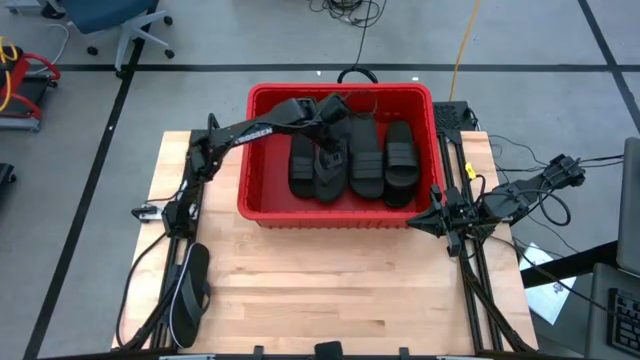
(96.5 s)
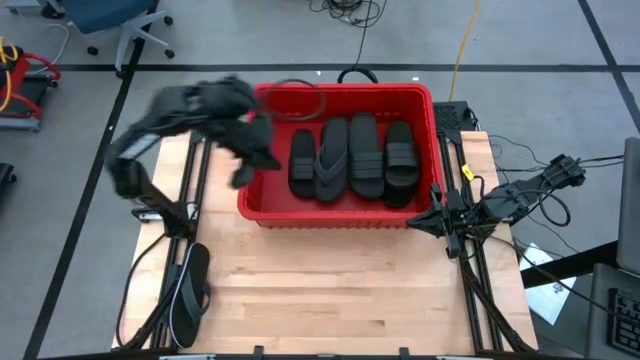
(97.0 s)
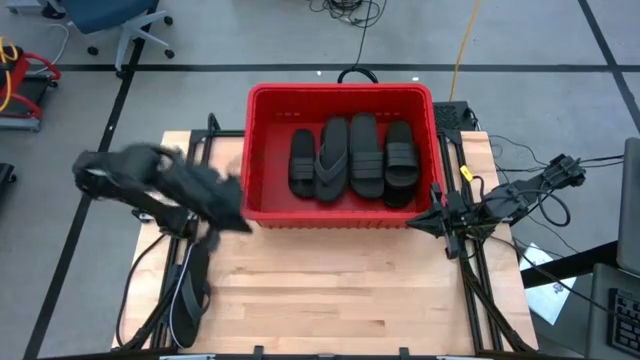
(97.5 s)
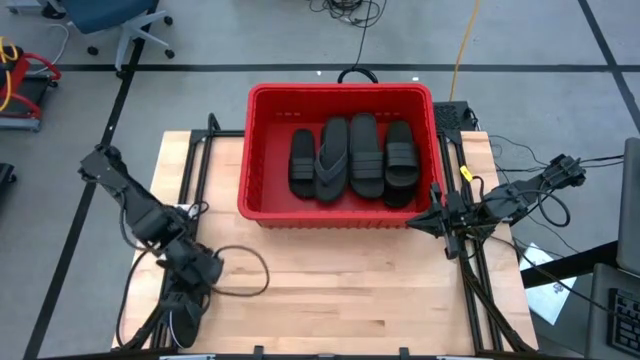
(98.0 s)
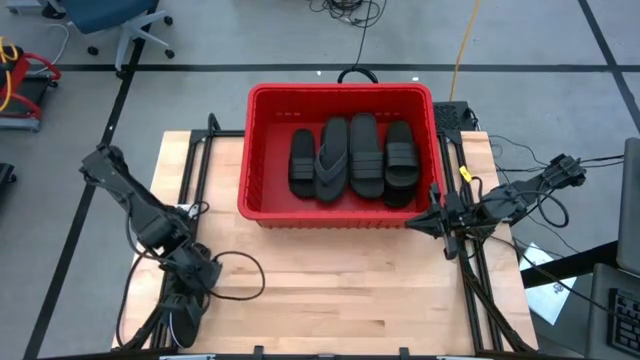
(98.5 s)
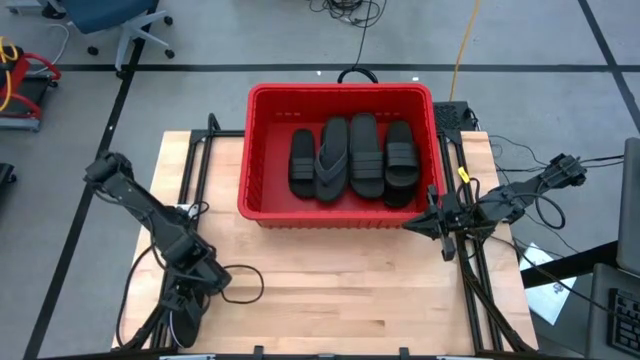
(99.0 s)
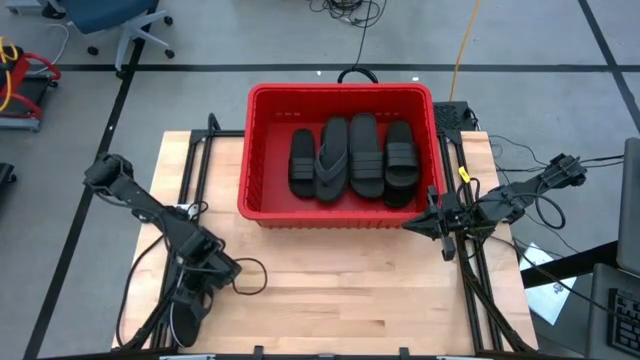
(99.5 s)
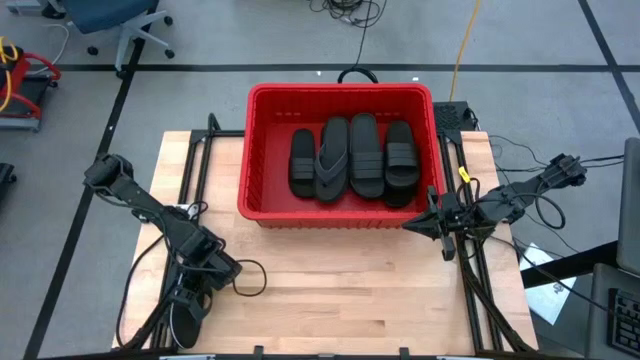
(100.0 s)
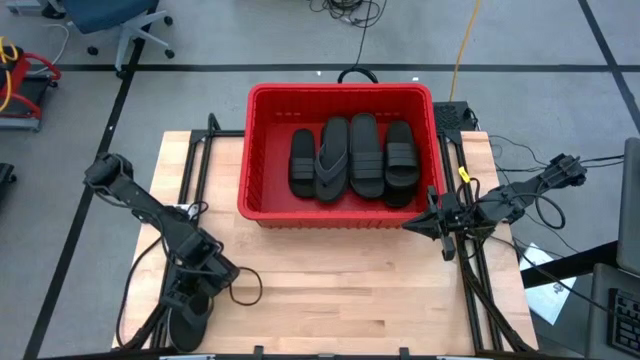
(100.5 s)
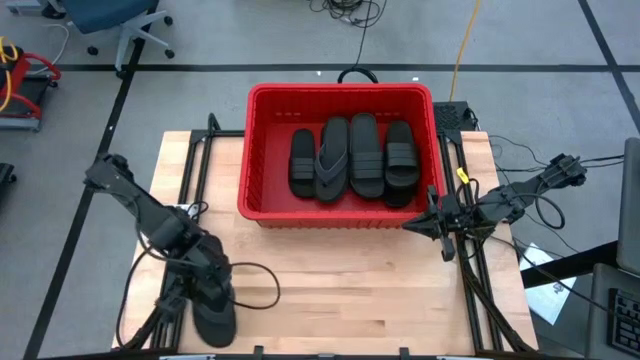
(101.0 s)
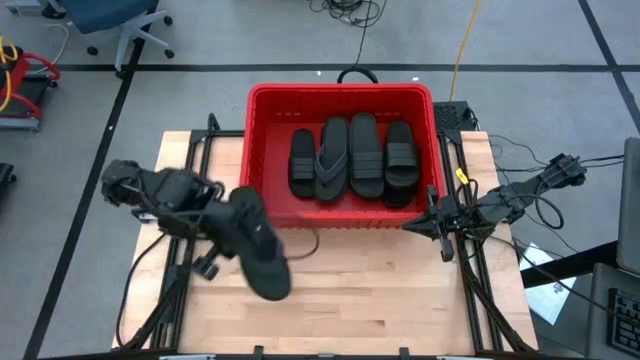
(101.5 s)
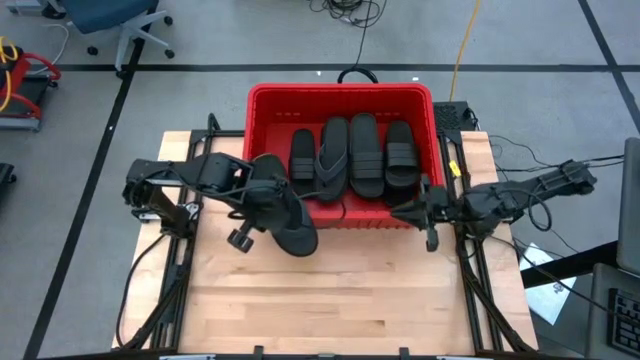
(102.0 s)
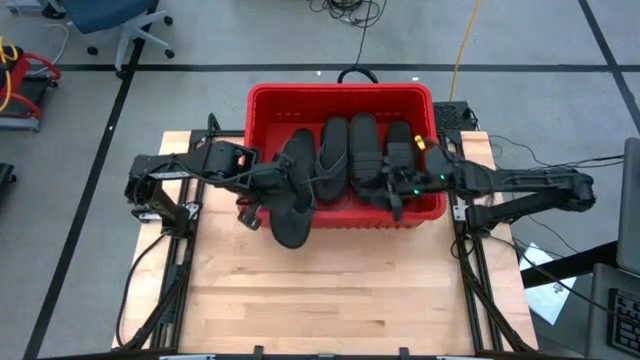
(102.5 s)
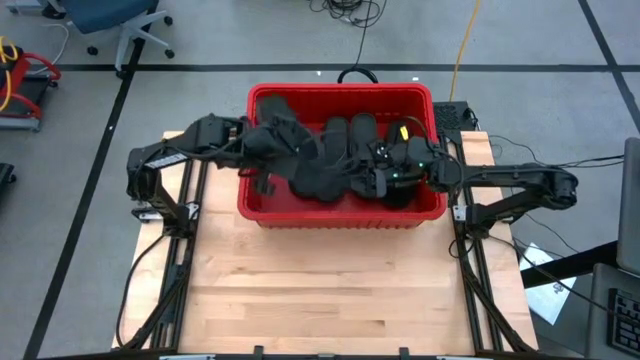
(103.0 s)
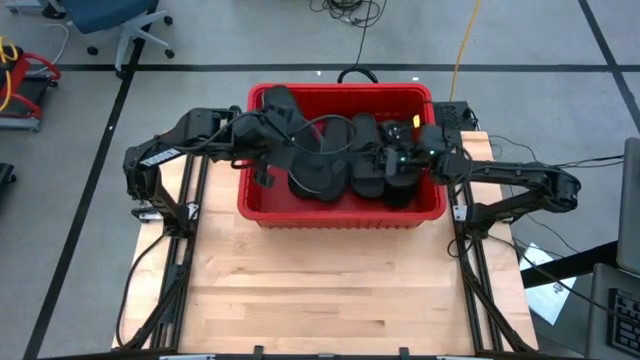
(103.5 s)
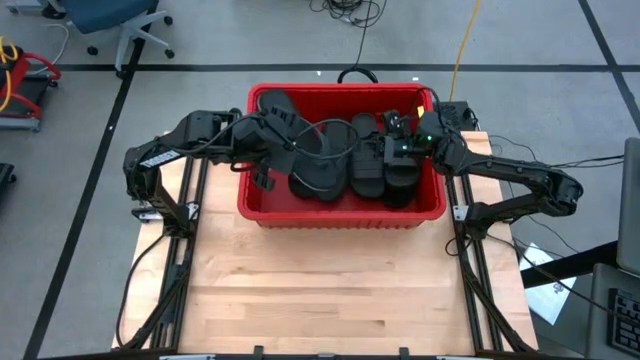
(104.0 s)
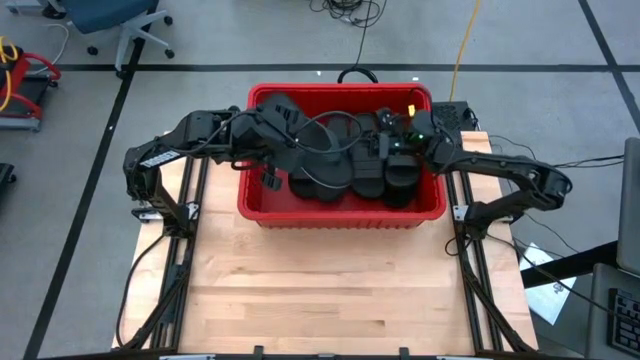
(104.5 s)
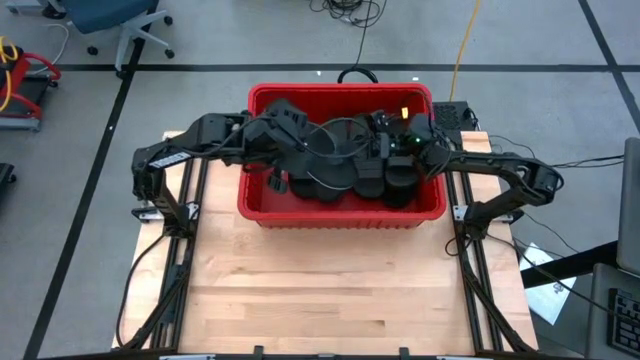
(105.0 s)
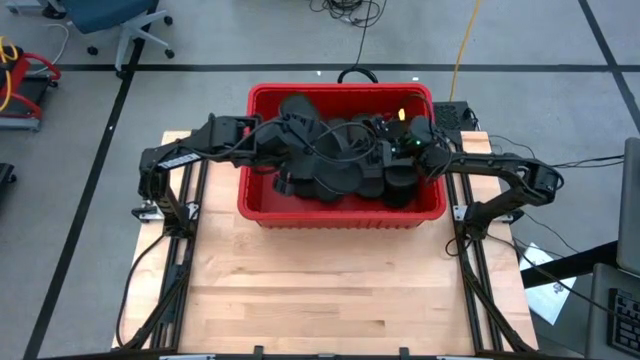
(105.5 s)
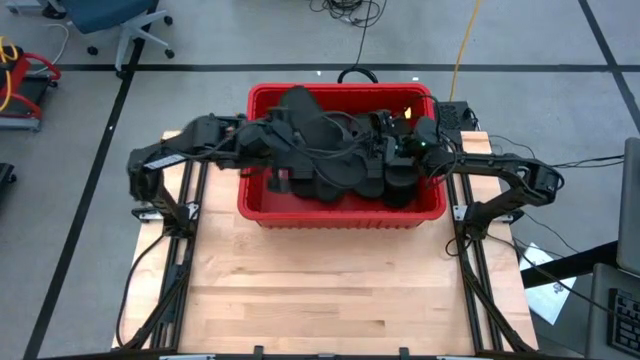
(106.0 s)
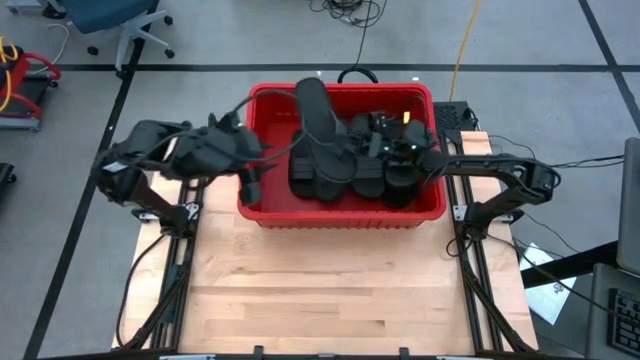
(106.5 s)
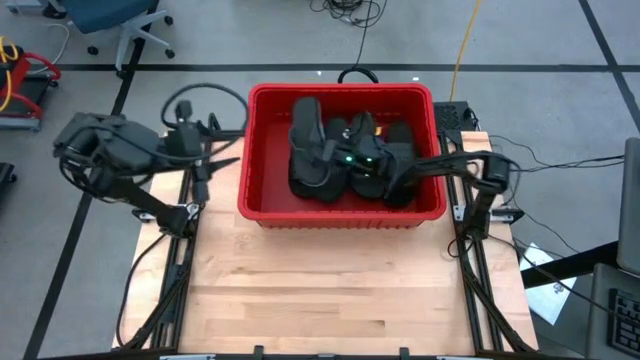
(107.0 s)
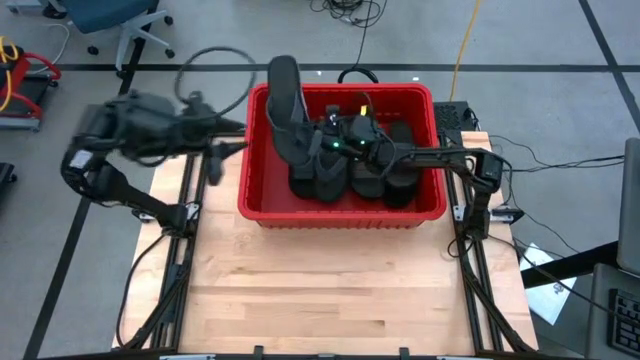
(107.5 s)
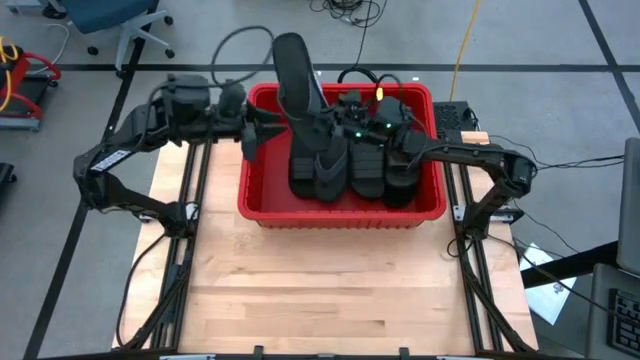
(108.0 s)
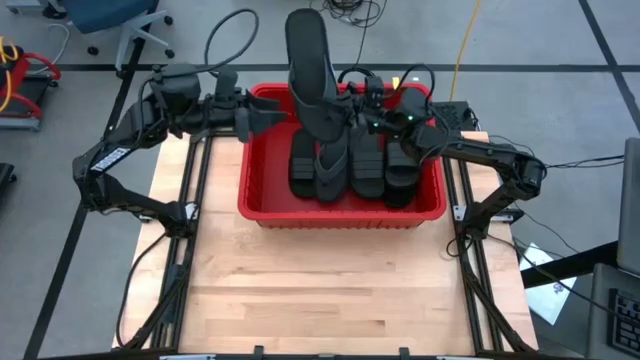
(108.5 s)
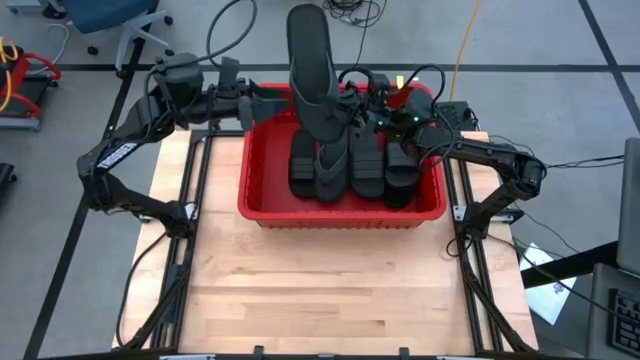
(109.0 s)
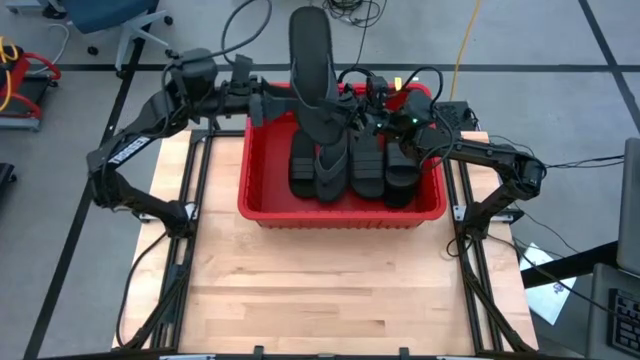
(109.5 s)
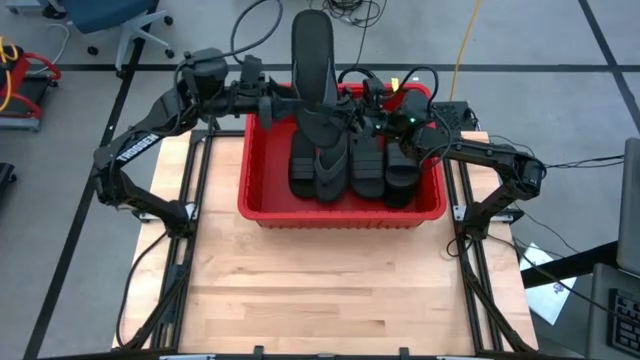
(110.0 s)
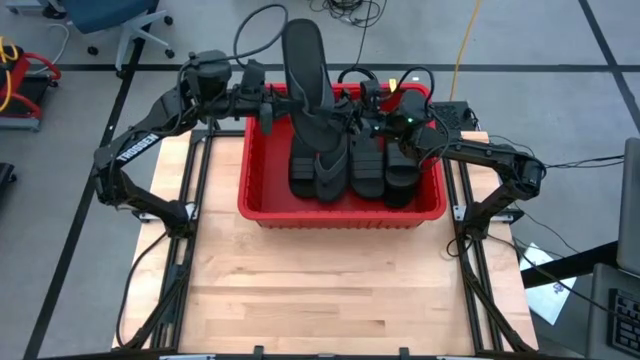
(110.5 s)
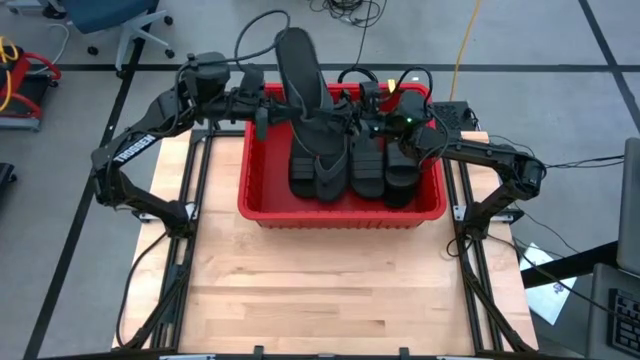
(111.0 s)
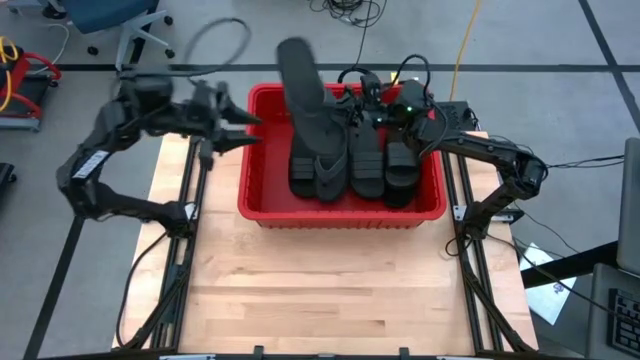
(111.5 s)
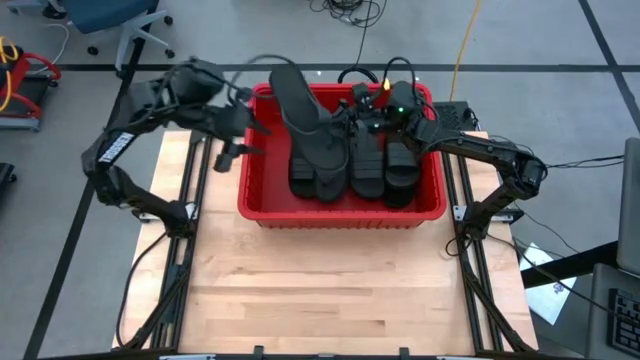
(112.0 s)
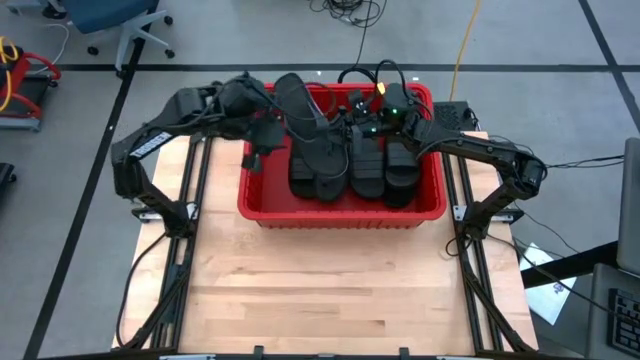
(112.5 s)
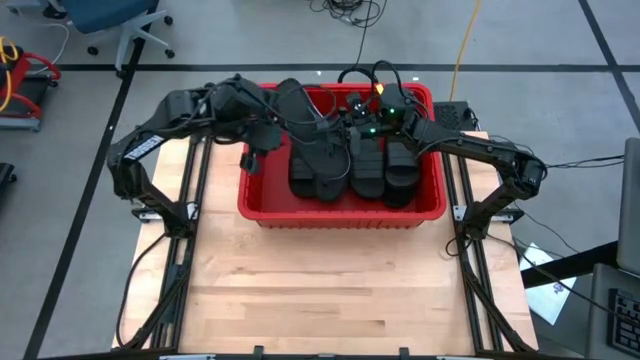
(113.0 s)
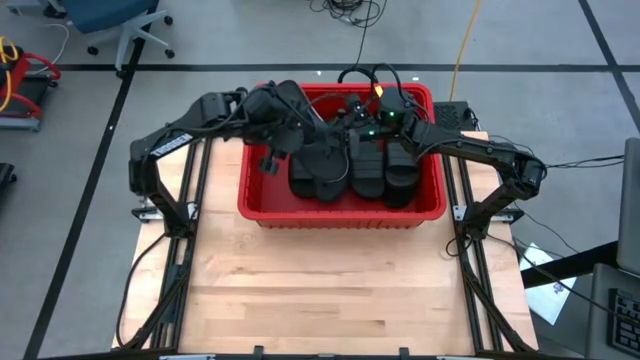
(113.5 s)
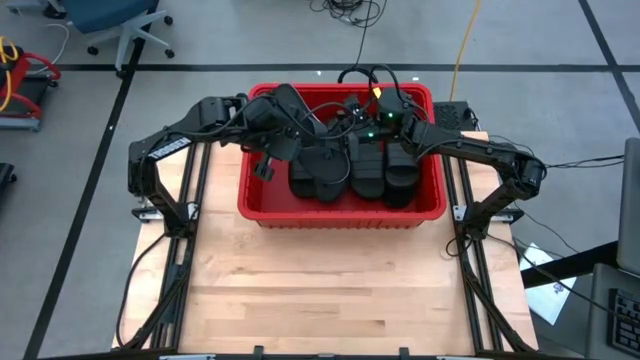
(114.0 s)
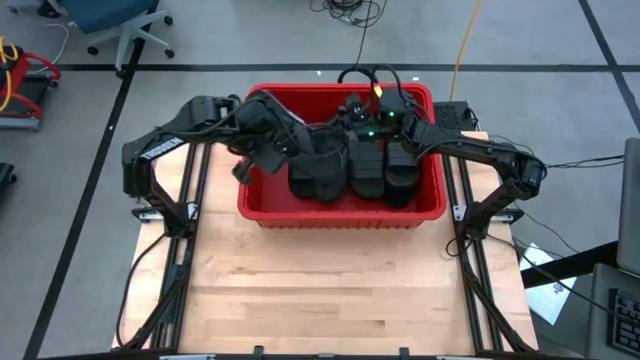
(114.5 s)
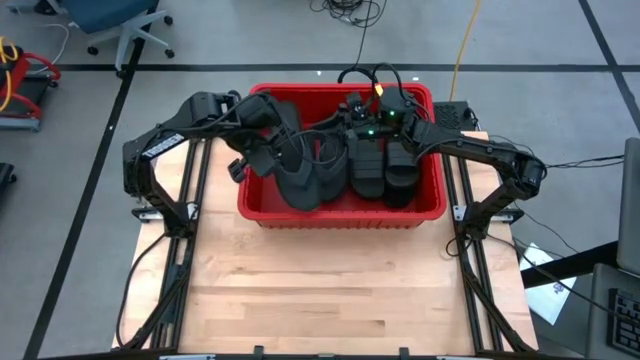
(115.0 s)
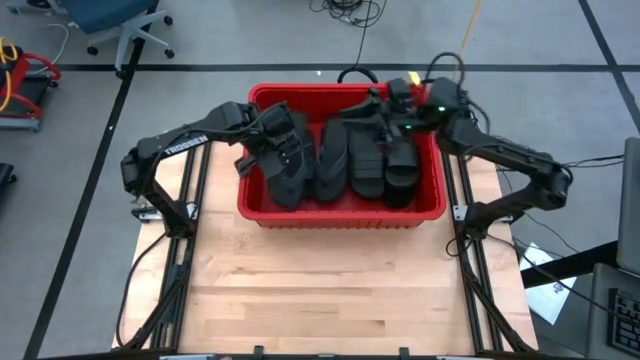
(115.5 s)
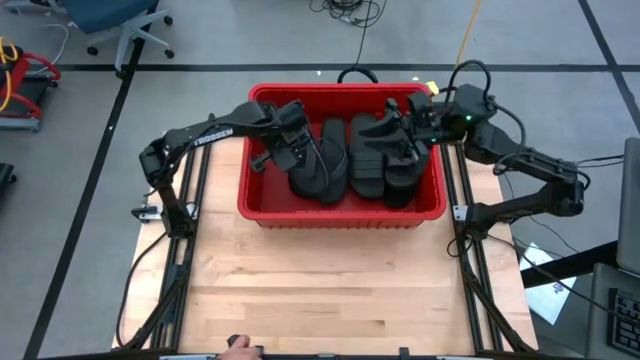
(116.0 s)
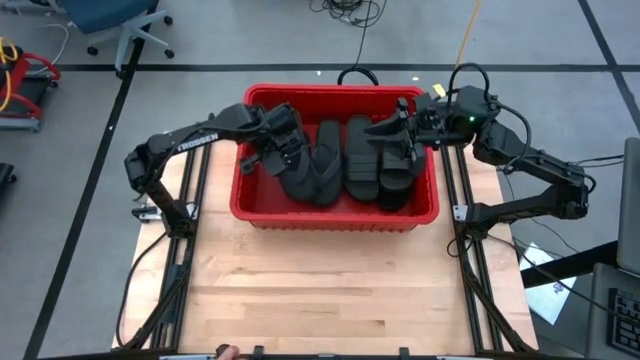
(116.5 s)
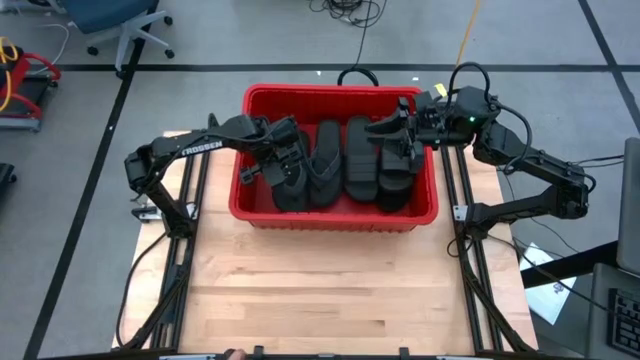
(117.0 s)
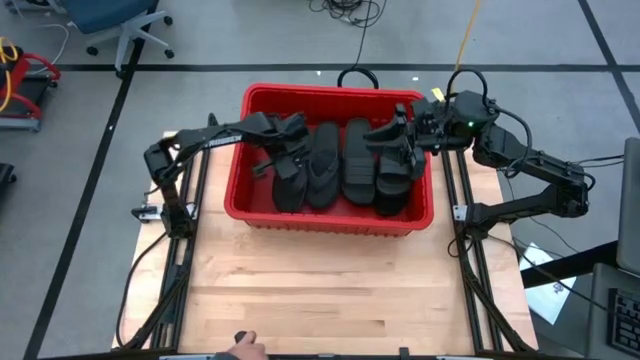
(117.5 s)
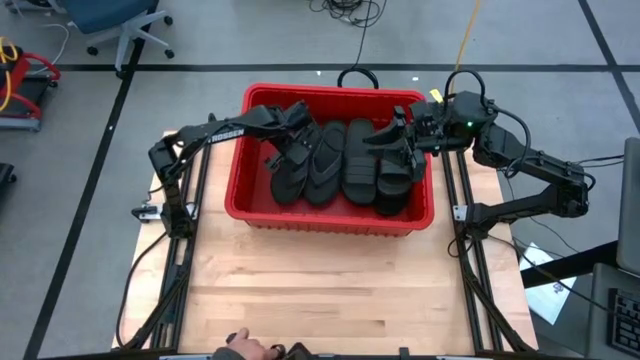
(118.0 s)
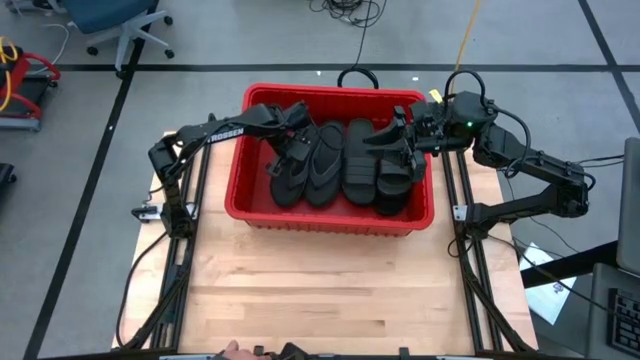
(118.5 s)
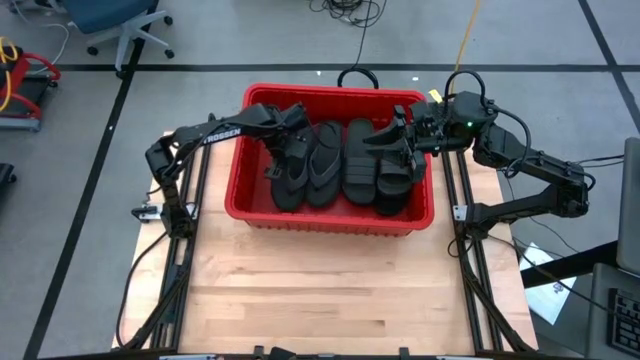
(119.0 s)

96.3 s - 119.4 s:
Task: Pick and place slides into bin
Put the black slipper into the red bin
